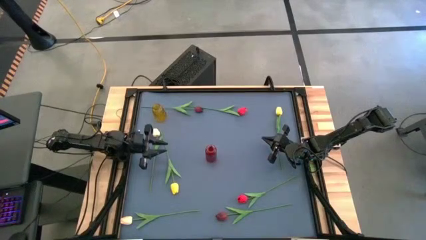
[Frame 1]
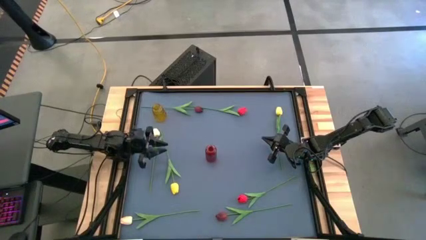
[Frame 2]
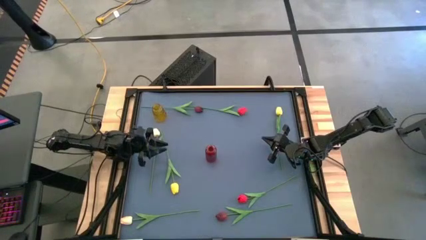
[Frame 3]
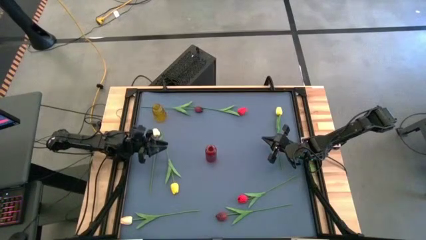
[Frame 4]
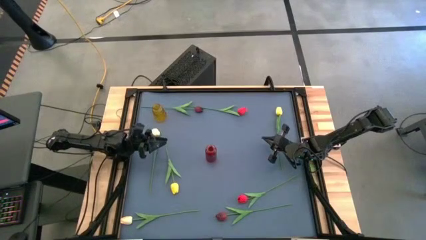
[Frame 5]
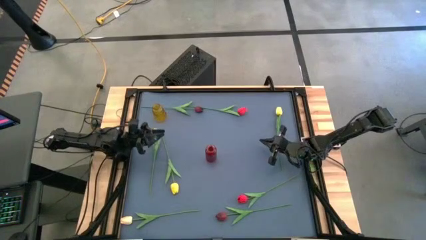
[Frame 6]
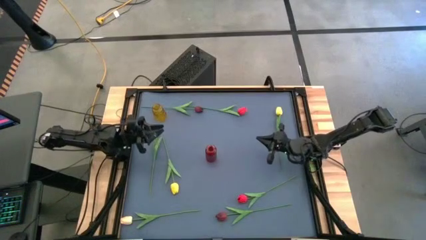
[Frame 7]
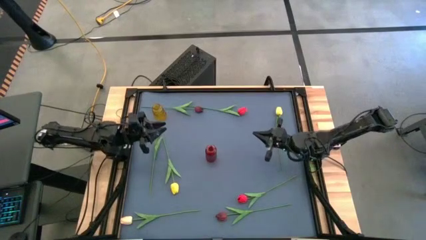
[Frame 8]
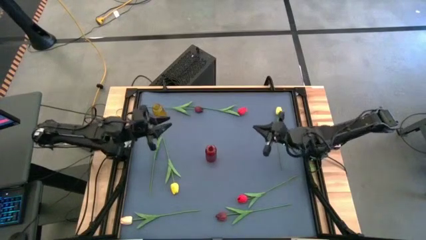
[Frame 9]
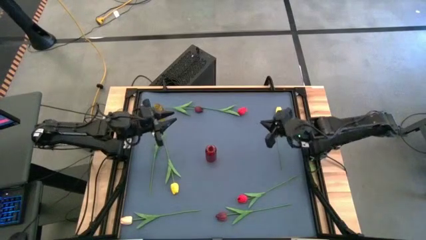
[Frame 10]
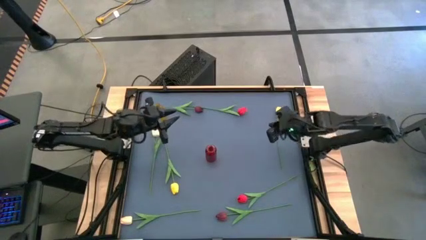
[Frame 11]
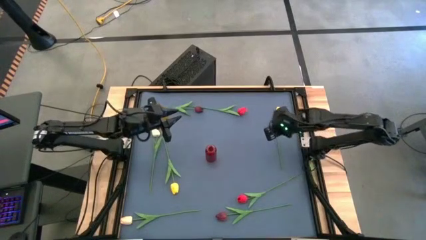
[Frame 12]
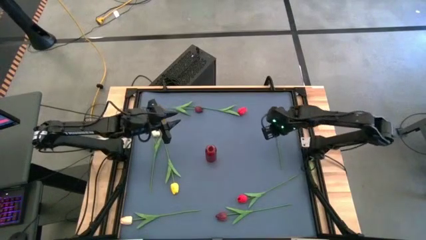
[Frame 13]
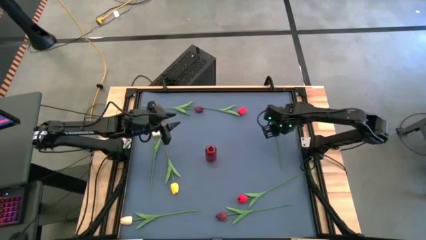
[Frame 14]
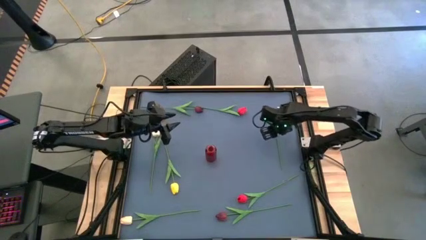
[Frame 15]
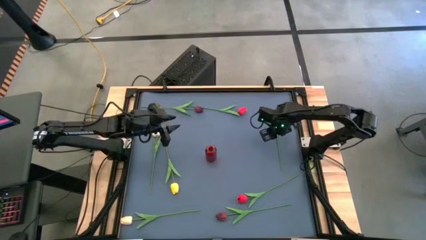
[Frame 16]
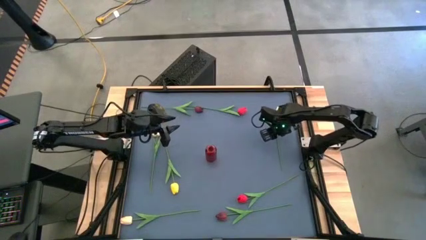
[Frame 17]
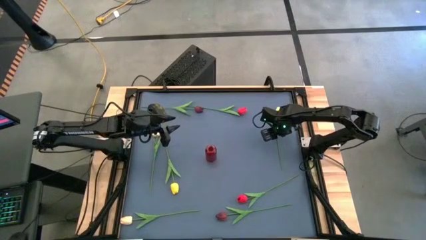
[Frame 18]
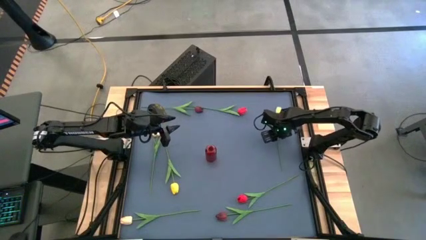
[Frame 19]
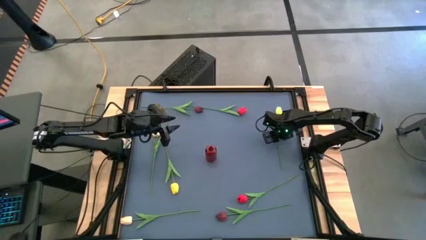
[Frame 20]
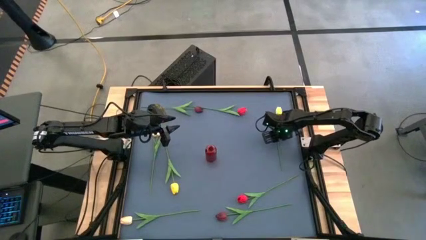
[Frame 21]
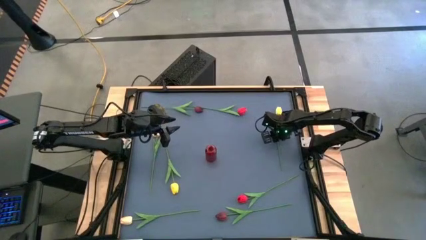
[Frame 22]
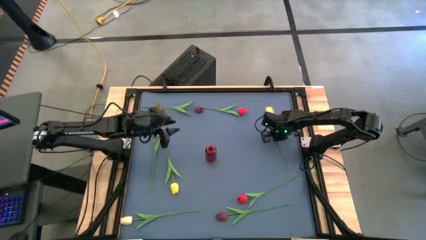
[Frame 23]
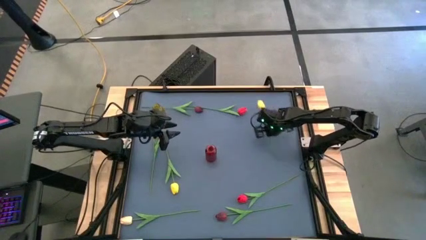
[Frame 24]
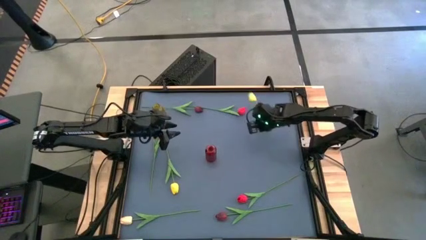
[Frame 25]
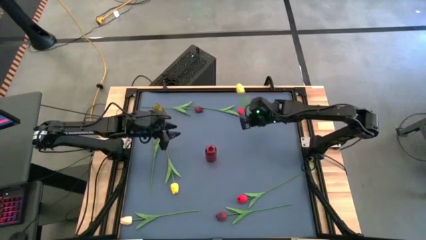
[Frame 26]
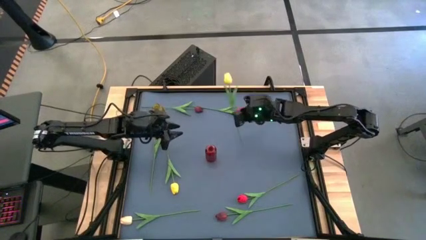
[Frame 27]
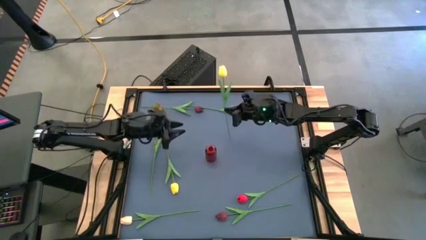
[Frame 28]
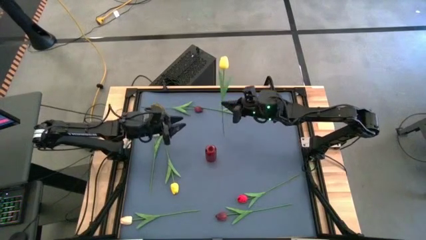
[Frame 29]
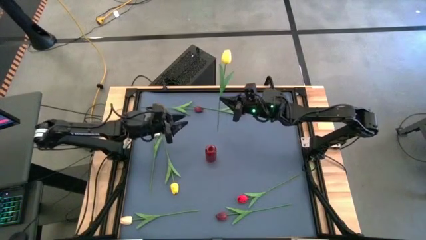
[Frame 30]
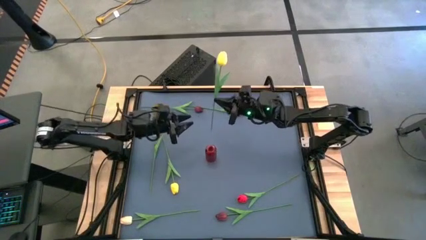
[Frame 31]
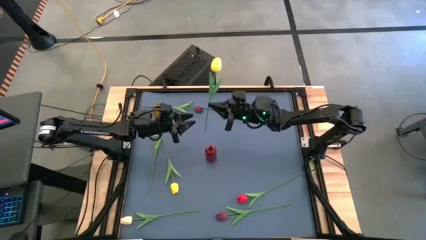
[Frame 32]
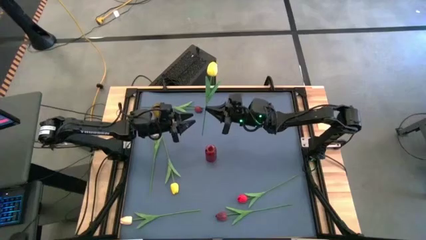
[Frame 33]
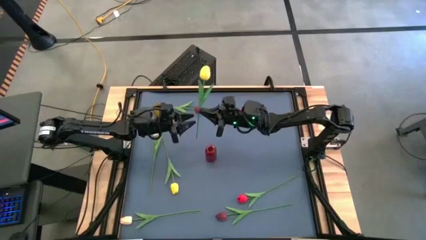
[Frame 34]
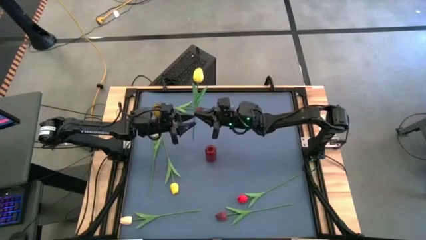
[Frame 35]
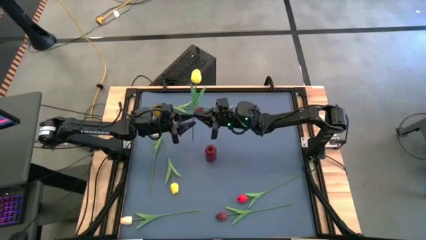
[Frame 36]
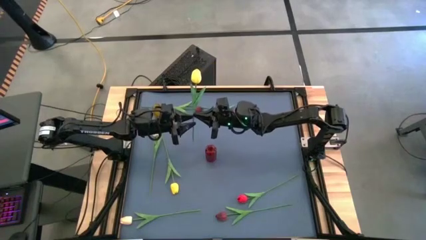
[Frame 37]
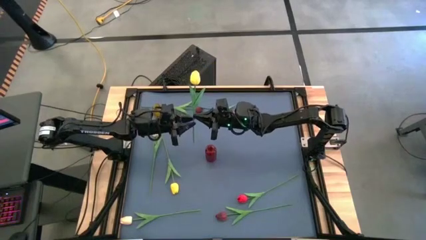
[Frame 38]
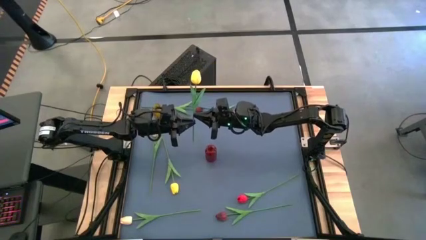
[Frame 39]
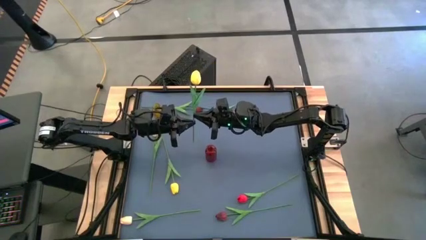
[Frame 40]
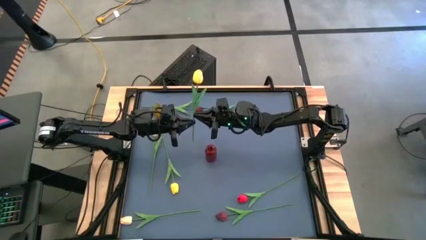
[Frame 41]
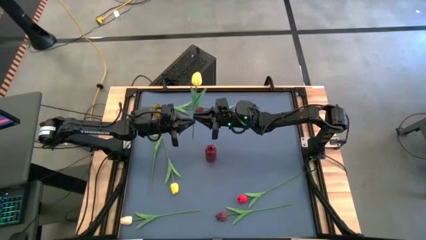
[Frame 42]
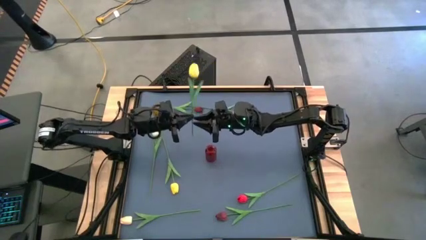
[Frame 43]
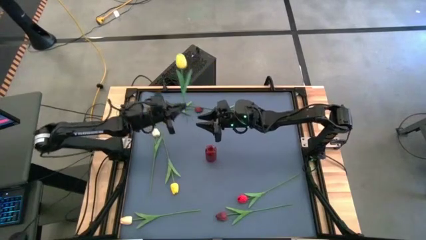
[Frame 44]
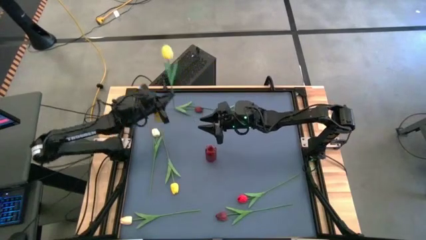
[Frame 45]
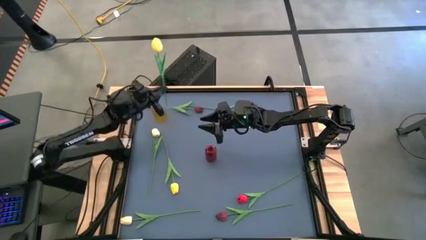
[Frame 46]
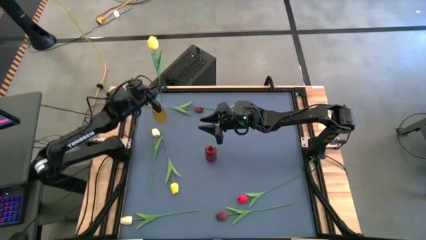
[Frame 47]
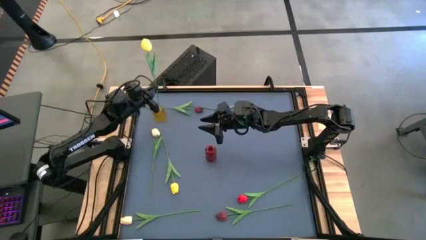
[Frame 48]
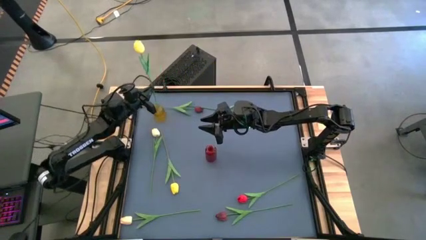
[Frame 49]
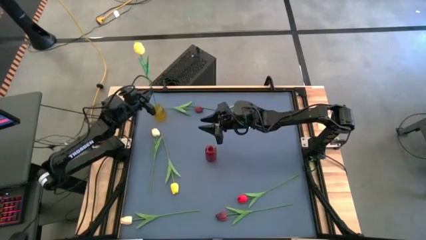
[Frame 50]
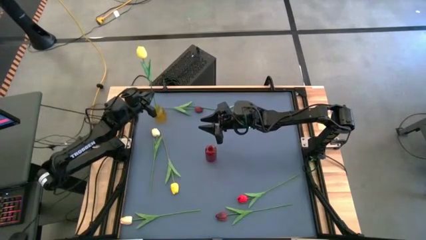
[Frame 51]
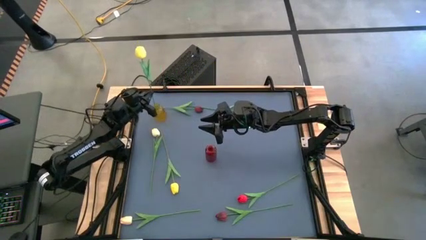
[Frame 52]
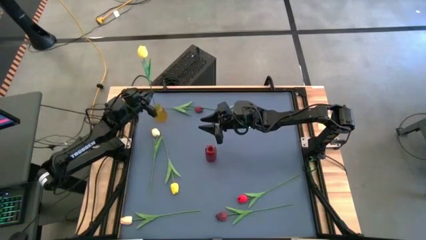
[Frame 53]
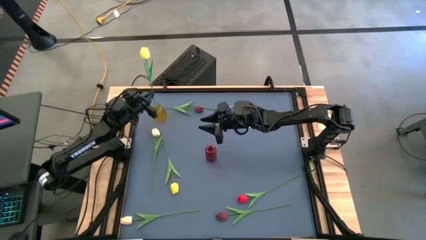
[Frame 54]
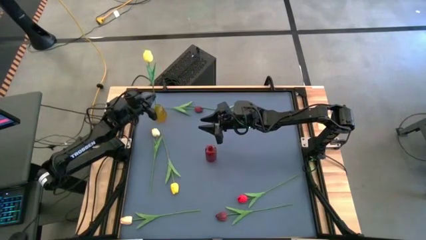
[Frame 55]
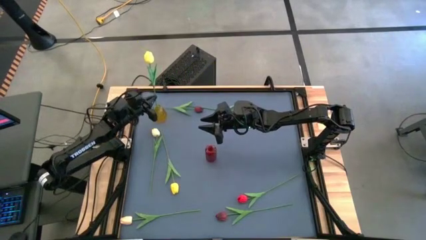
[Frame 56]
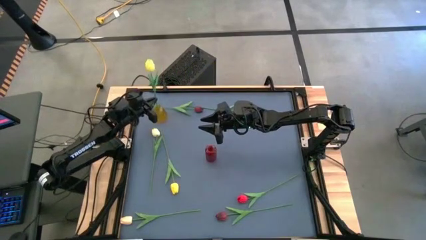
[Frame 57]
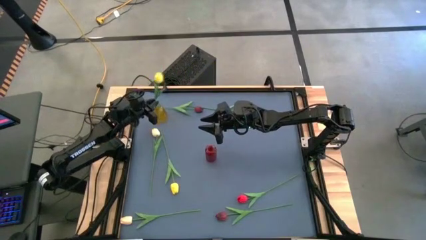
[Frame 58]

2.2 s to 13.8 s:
Task: Sort flowers into vase by color
Put the right yellow flower into the yellow vase

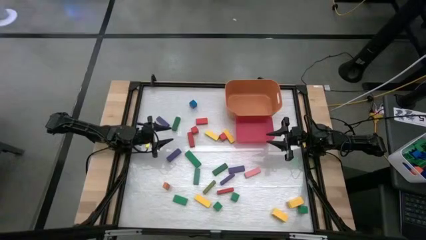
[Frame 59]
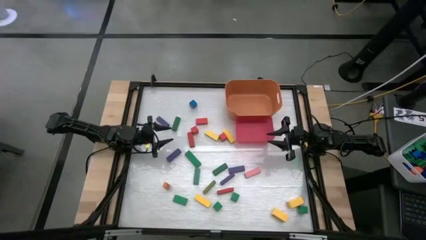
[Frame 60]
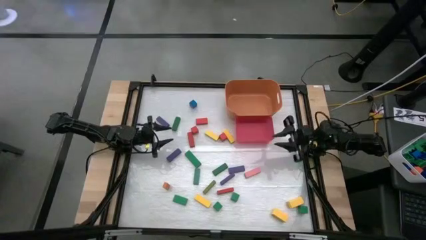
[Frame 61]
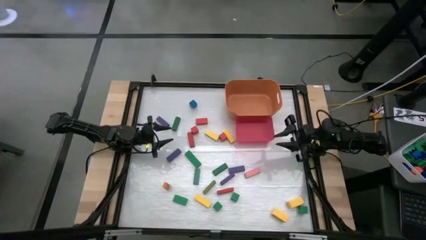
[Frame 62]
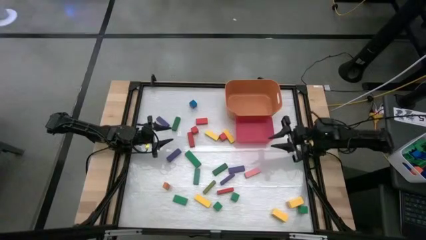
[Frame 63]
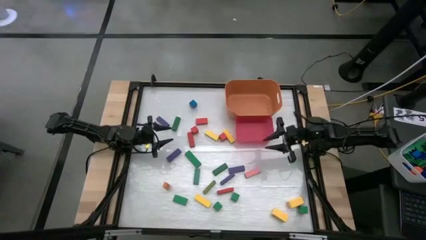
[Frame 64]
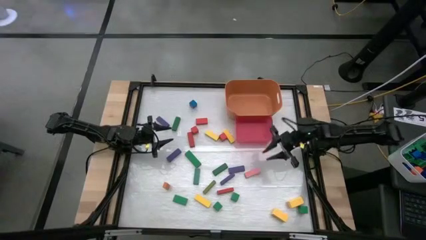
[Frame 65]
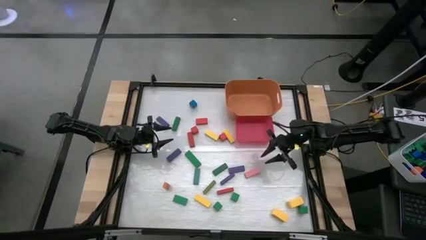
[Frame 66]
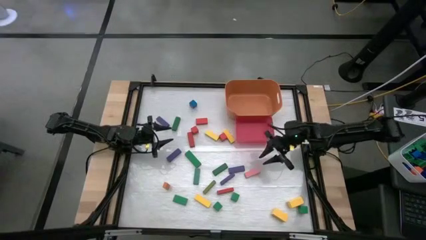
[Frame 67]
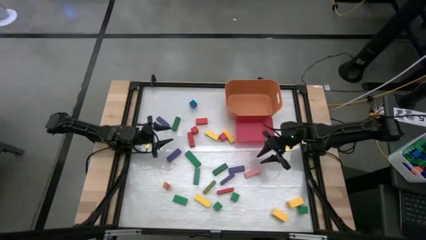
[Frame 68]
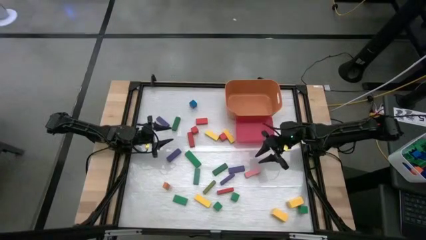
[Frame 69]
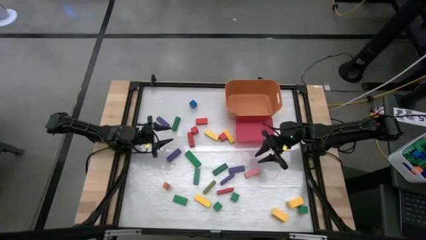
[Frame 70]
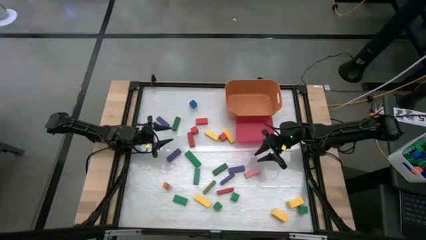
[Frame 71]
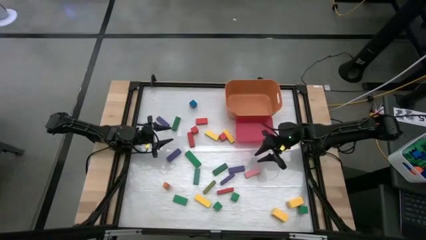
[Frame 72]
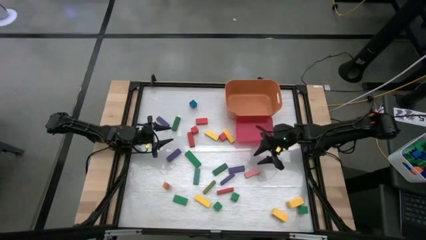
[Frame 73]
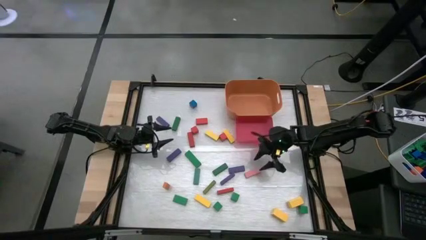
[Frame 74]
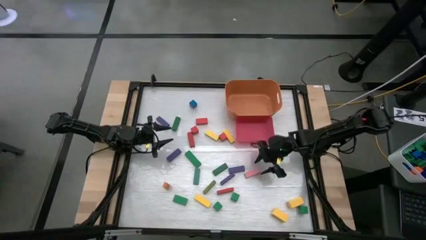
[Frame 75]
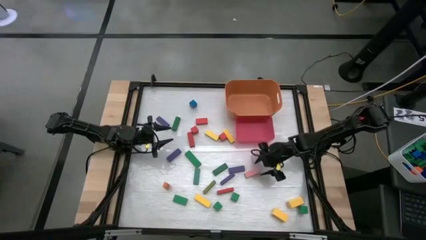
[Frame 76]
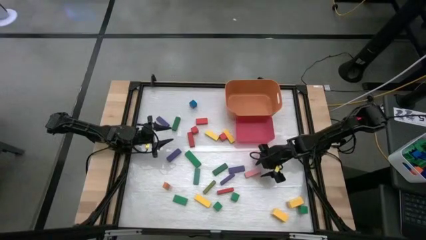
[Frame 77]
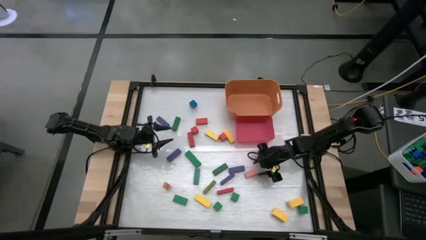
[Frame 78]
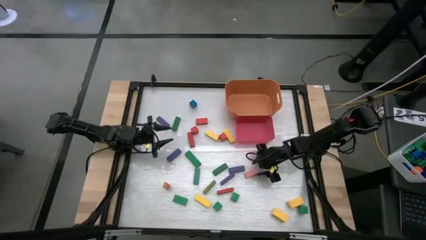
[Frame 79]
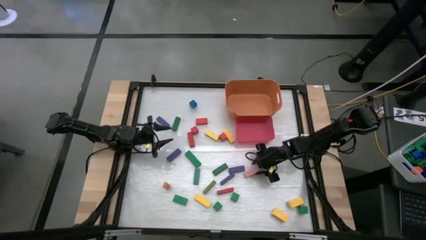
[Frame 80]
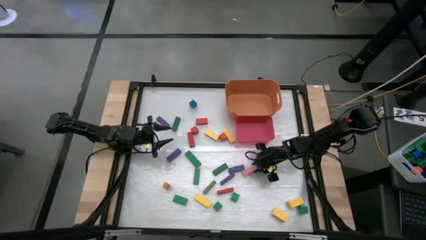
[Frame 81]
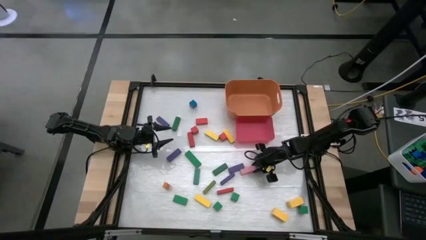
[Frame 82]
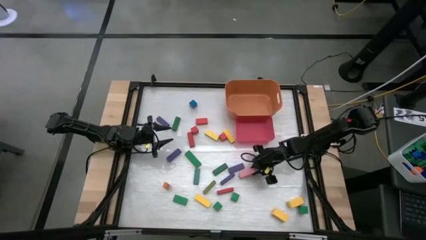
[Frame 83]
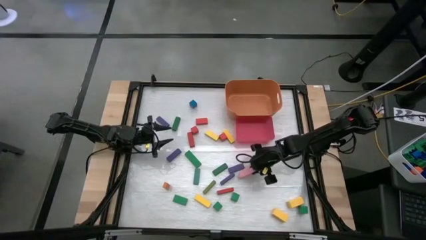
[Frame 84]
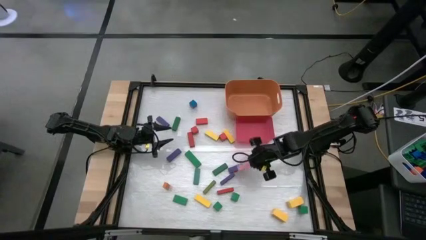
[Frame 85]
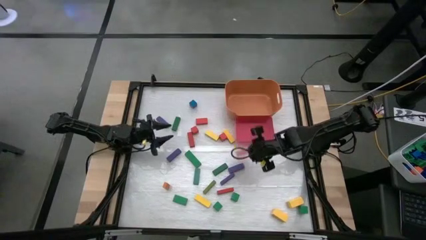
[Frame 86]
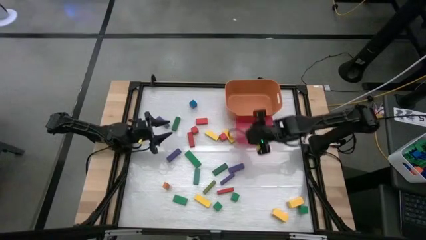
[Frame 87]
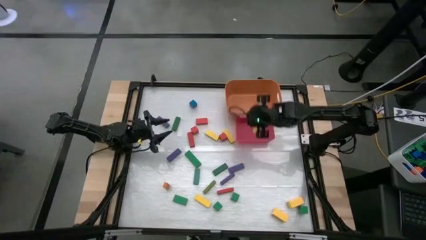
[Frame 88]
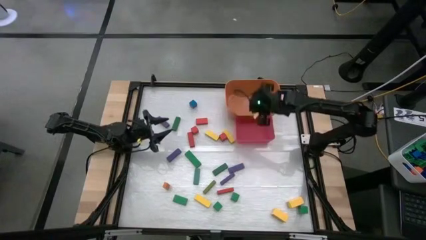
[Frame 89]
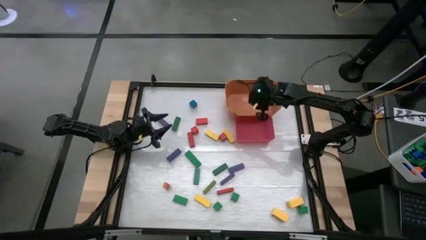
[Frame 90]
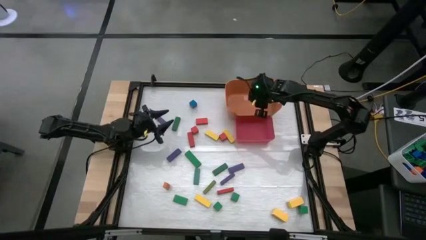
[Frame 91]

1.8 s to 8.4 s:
Task: Sort blocks by size
Put the pink rectangle block into the orange bin
